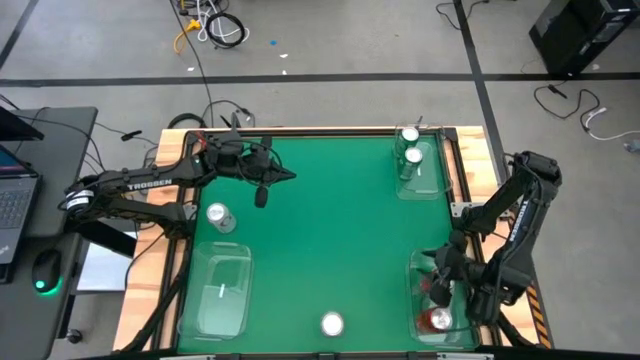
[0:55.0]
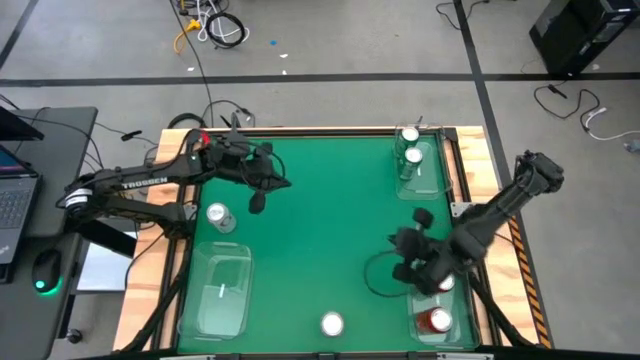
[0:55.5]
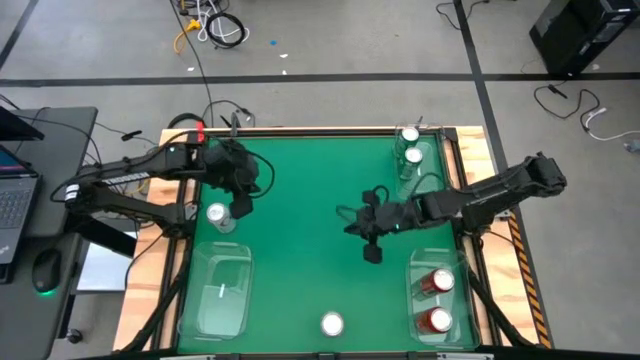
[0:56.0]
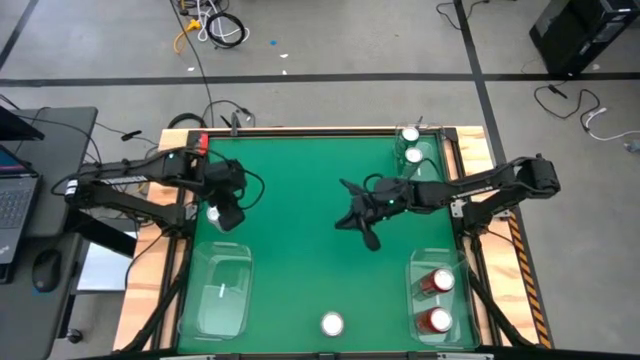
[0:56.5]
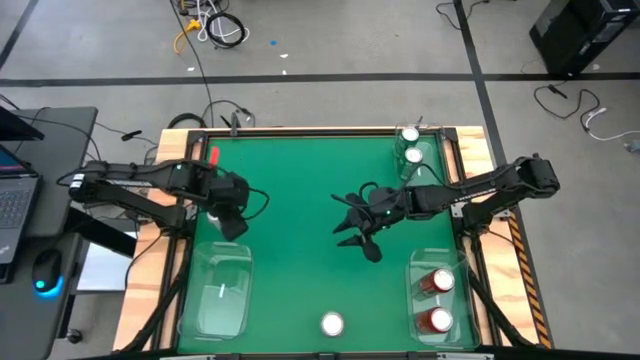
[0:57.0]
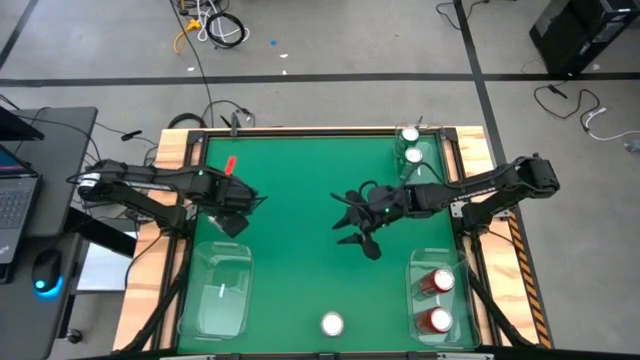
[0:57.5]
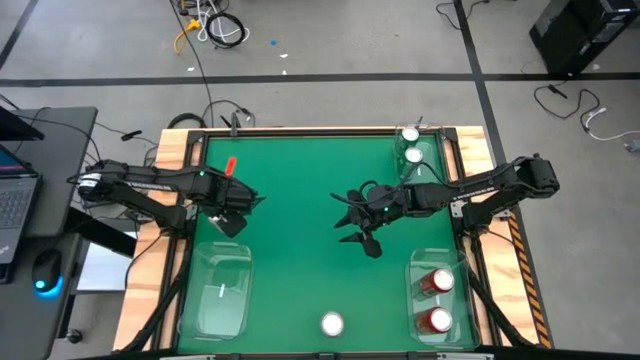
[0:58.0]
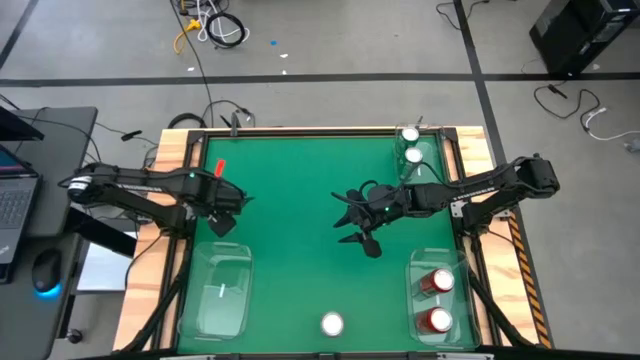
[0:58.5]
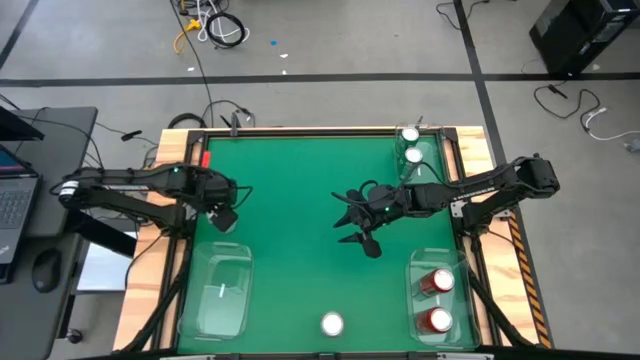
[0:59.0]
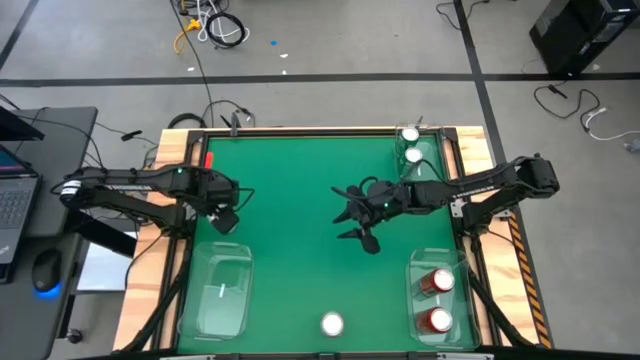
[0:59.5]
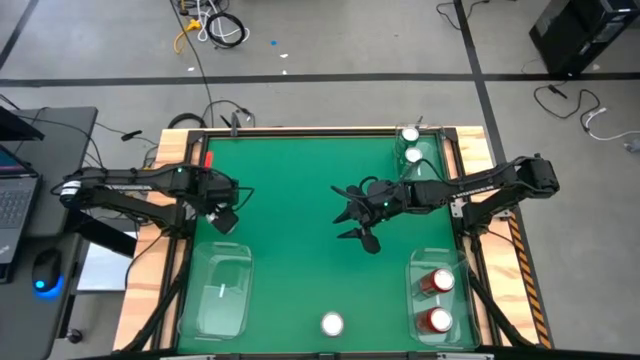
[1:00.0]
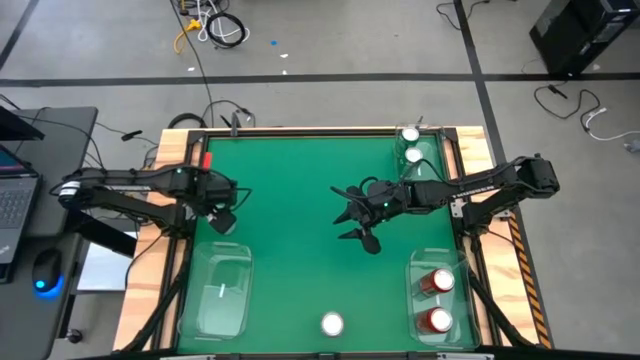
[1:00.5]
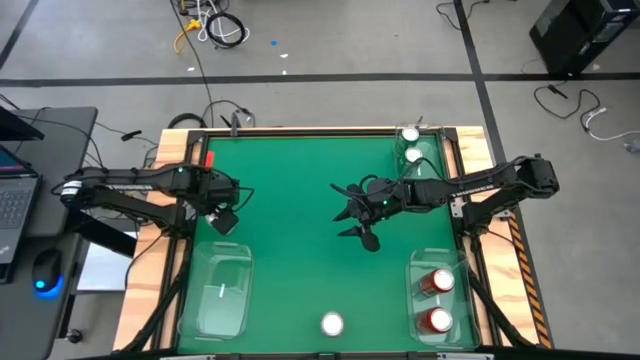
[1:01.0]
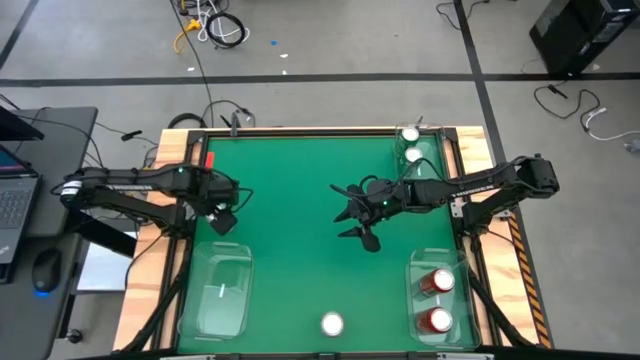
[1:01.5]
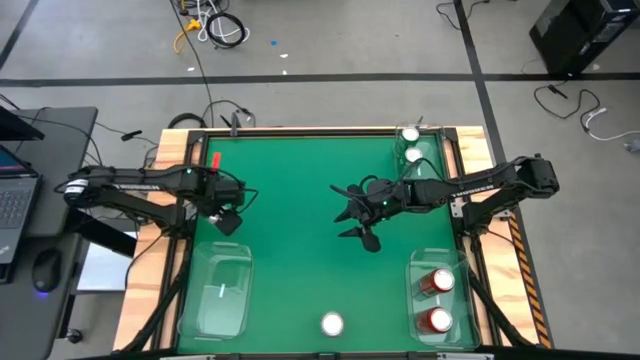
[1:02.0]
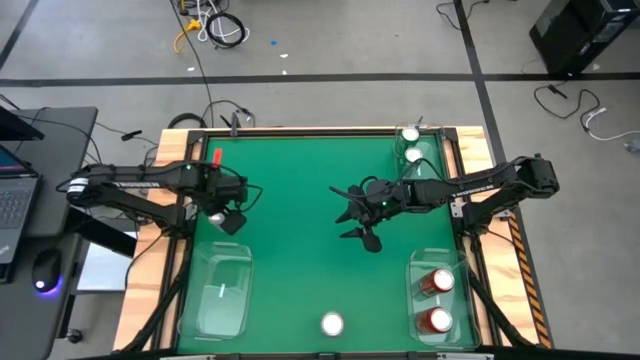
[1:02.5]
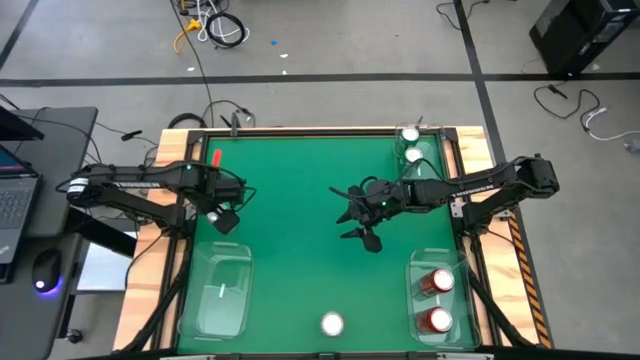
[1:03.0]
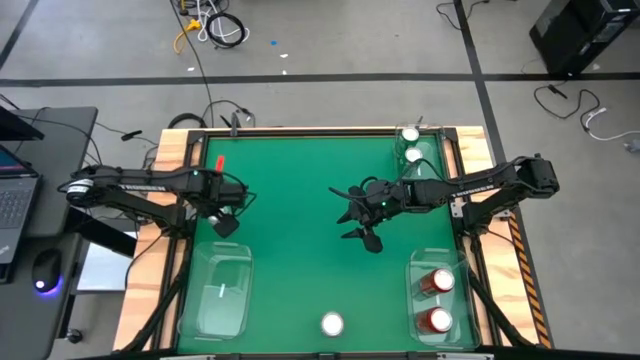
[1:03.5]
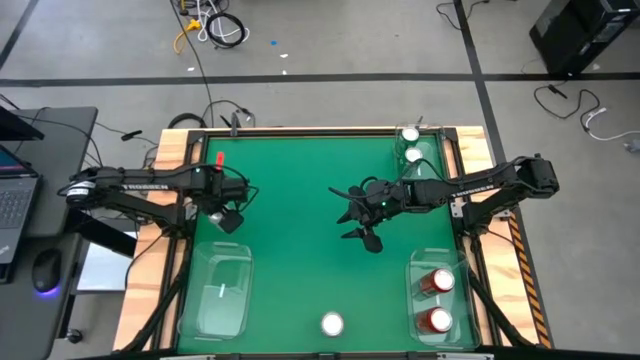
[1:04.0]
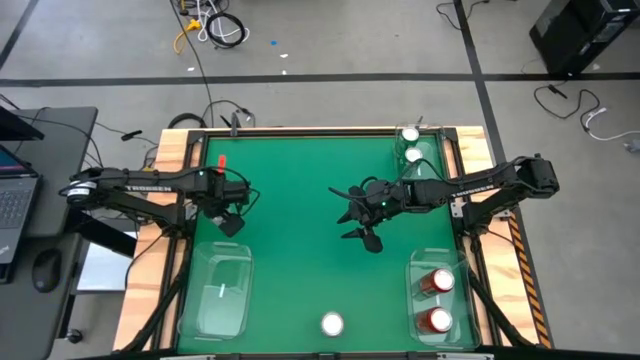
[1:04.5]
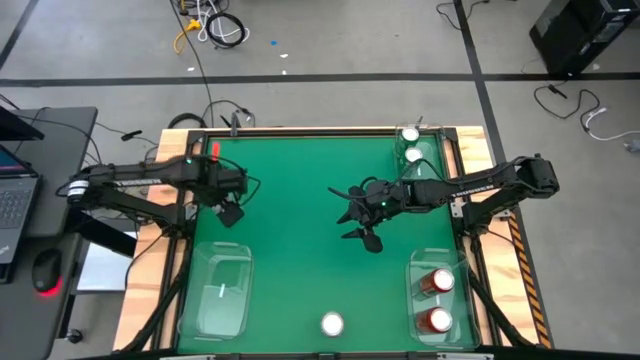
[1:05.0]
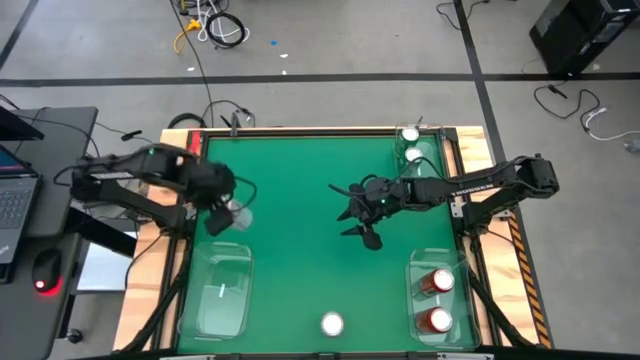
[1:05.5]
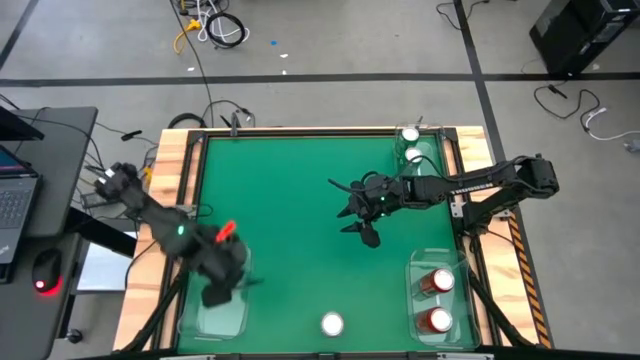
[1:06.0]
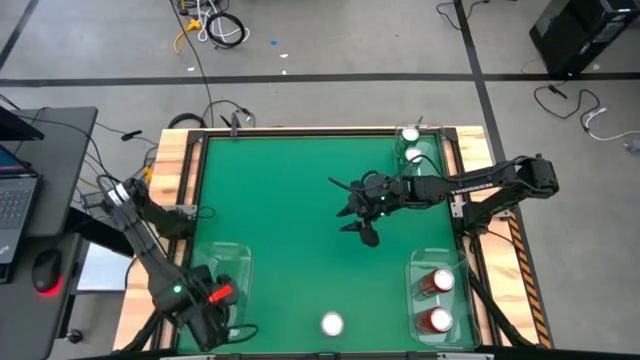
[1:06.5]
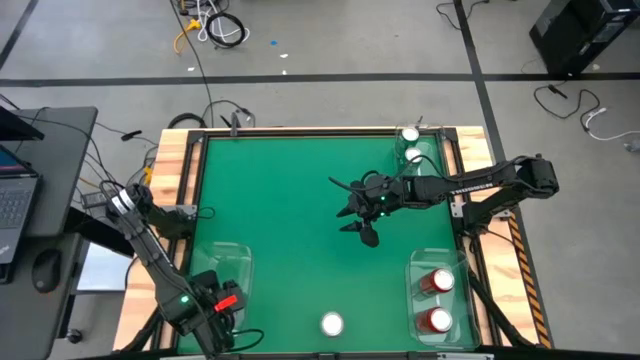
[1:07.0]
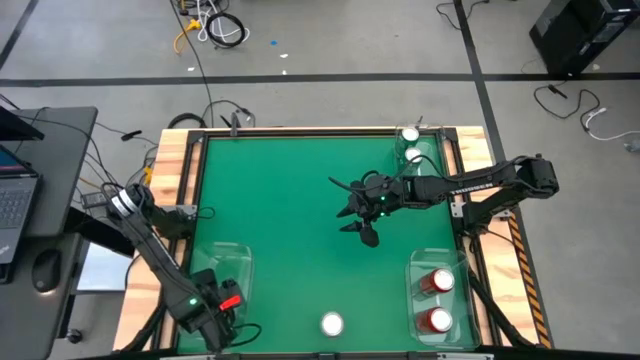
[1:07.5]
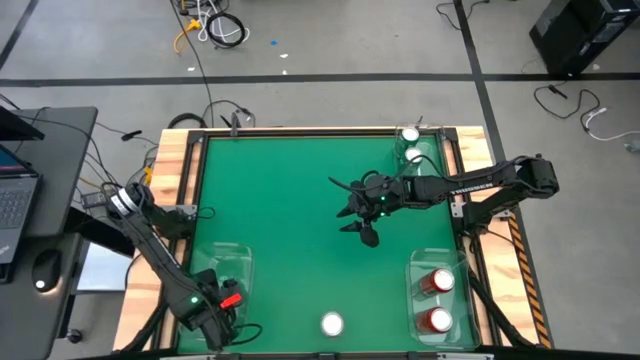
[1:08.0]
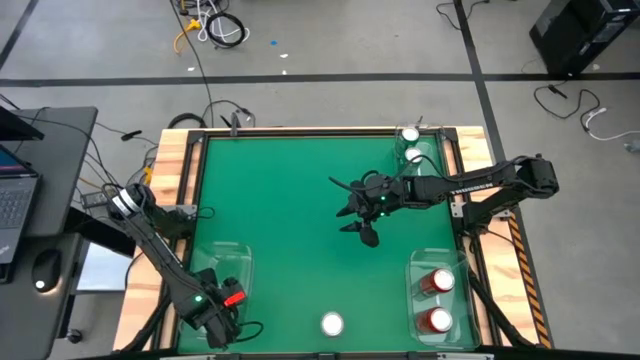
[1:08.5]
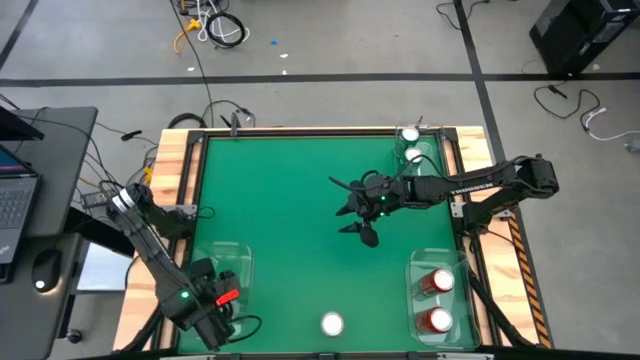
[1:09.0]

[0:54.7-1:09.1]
Task: Sort soda cans
Put the top red/white soda can into the left transparent bin

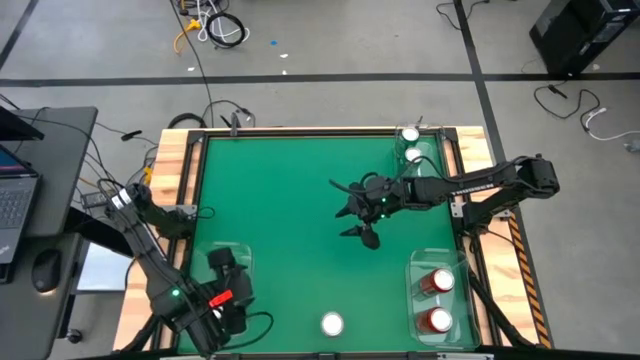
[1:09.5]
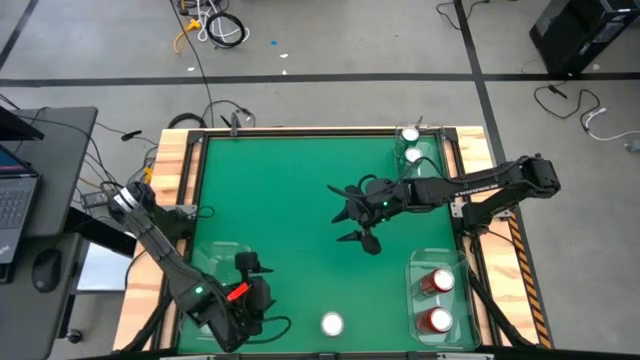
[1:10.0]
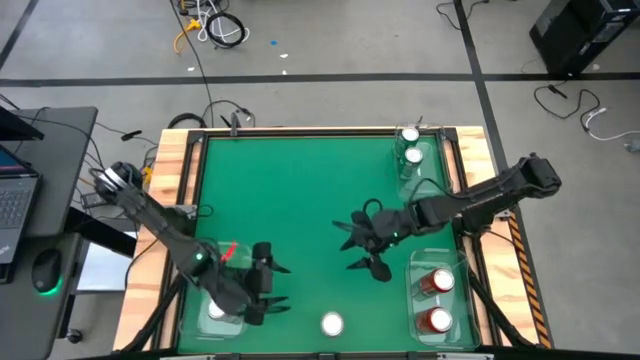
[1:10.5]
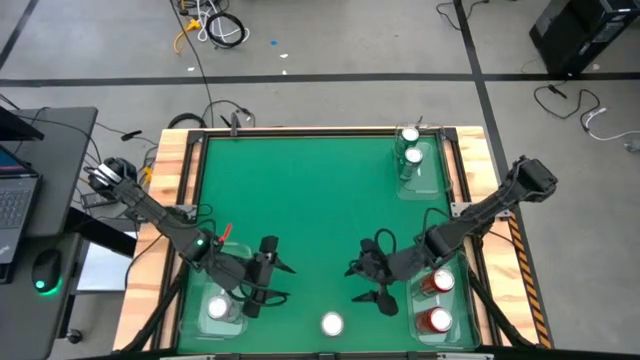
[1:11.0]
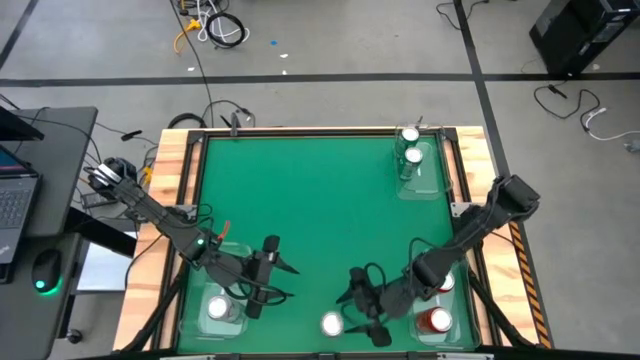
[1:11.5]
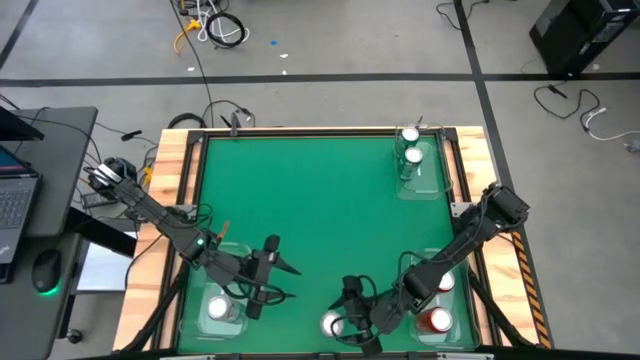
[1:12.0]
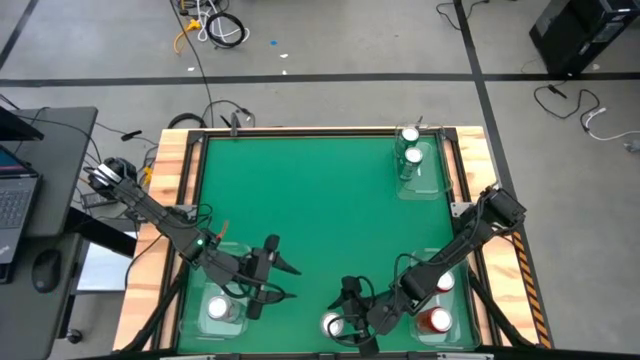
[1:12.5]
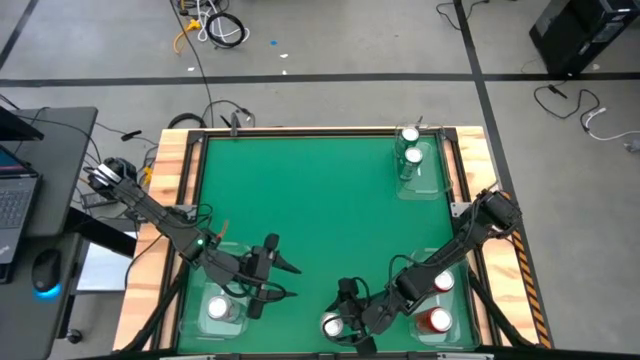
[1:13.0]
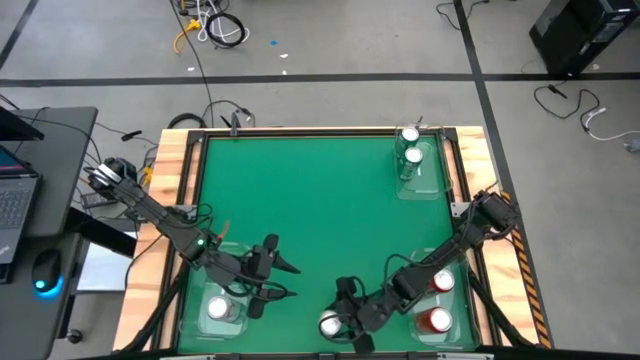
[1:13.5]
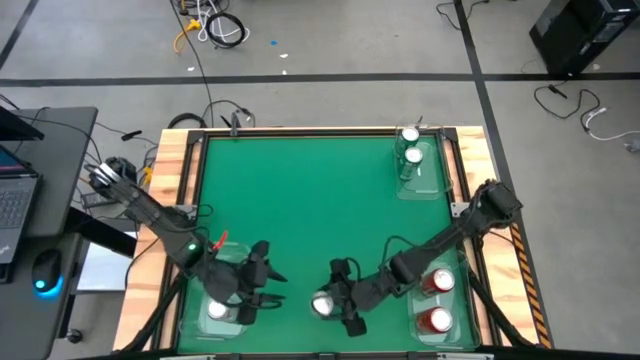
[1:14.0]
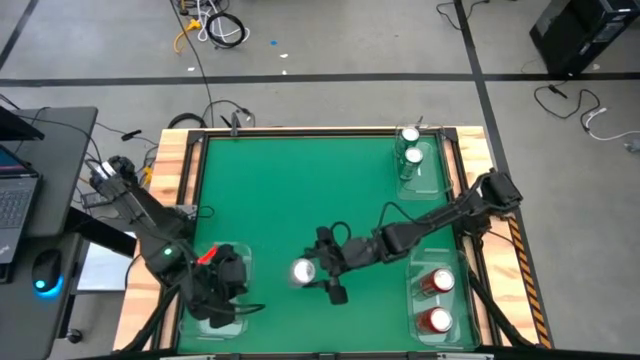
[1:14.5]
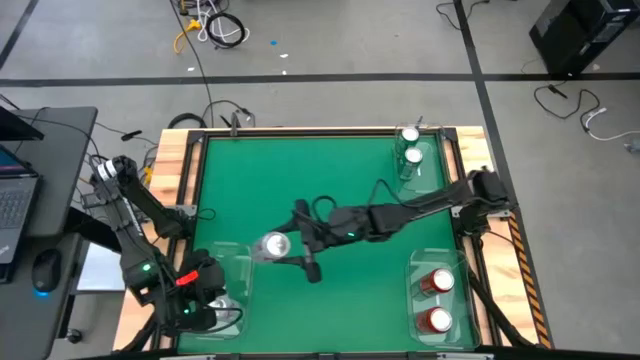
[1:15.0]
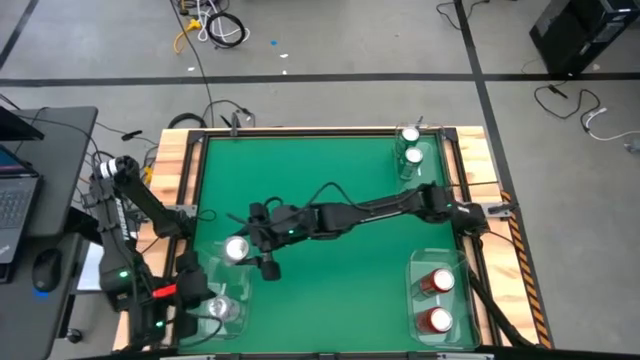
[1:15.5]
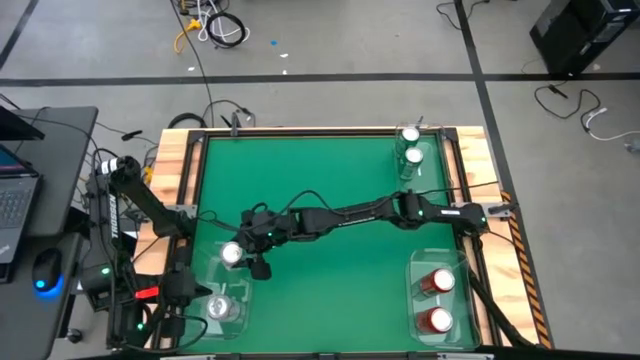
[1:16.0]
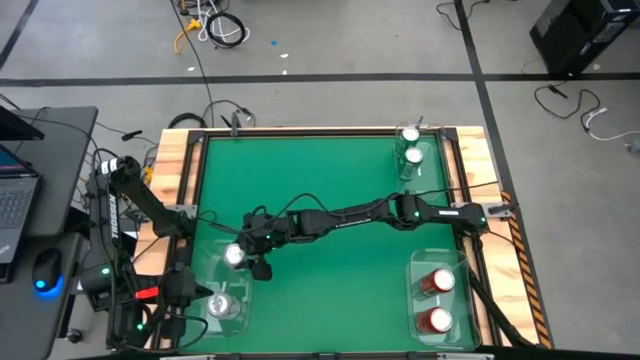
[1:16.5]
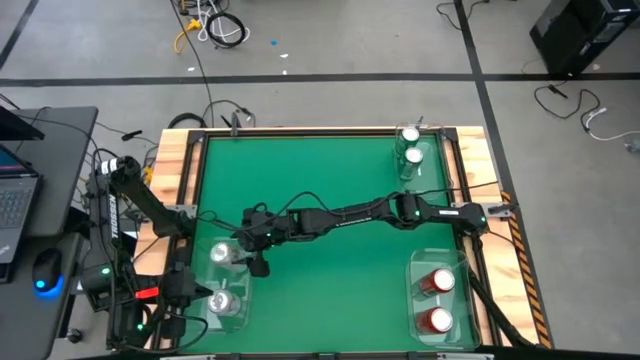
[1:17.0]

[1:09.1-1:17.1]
Put the bottom red/white soda can into the left transparent bin
